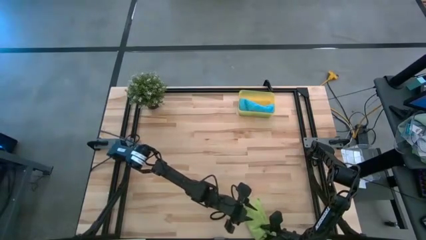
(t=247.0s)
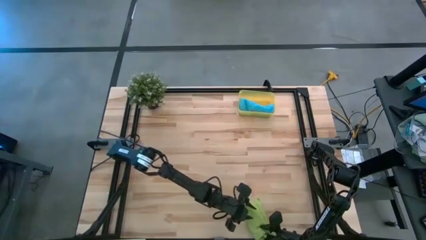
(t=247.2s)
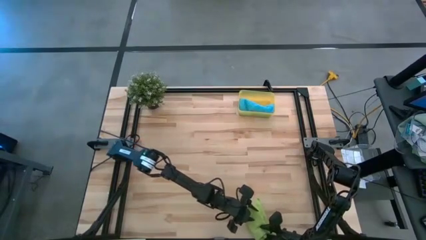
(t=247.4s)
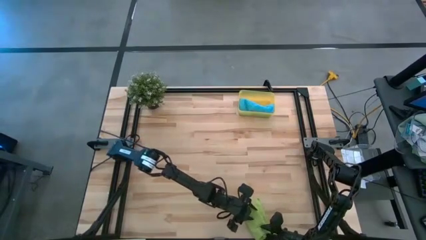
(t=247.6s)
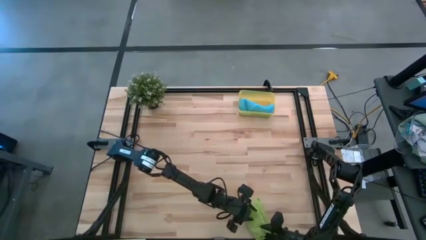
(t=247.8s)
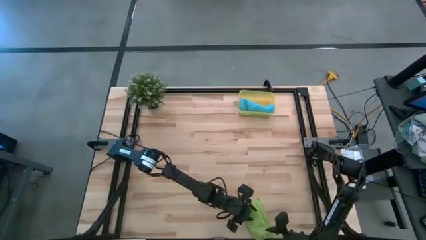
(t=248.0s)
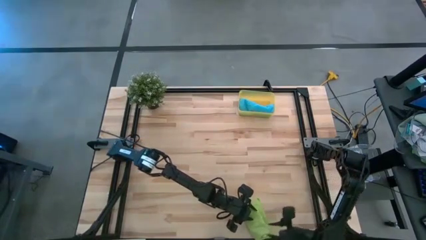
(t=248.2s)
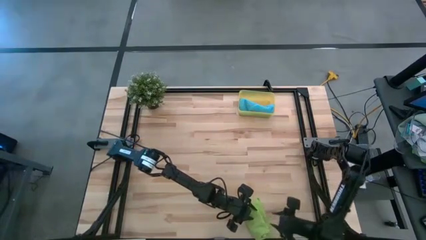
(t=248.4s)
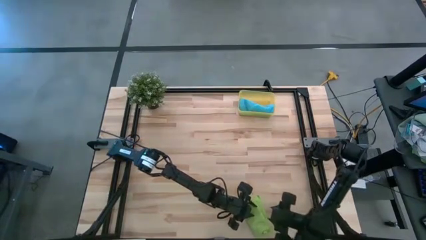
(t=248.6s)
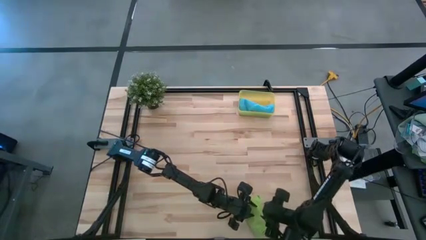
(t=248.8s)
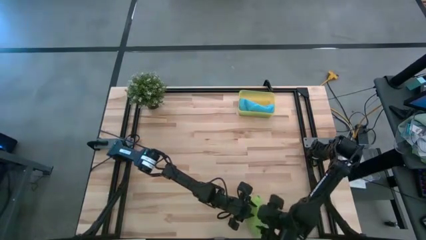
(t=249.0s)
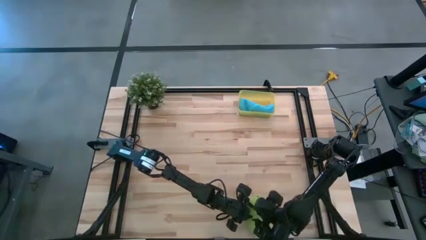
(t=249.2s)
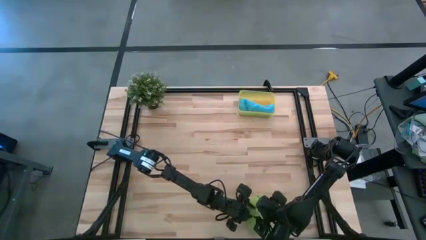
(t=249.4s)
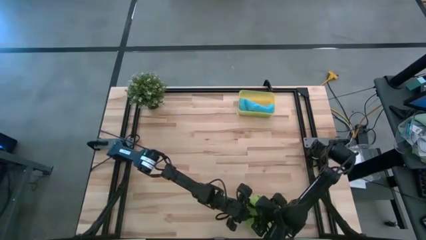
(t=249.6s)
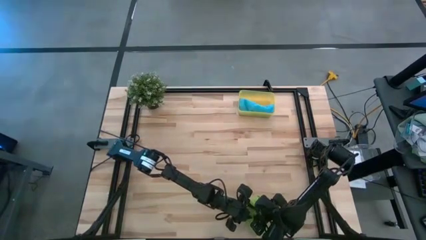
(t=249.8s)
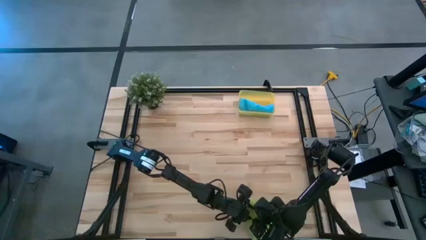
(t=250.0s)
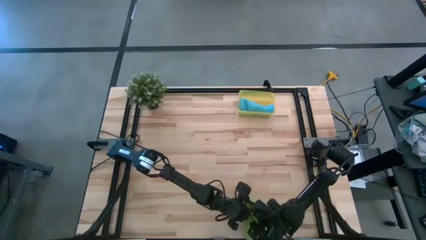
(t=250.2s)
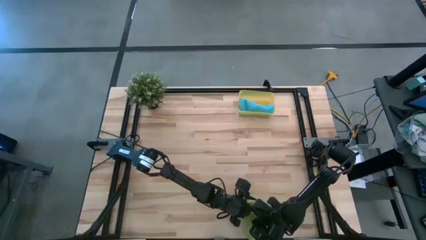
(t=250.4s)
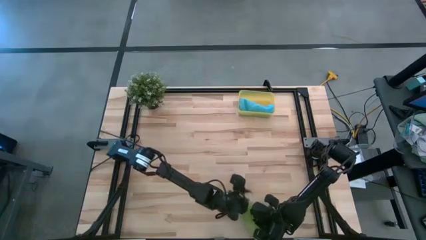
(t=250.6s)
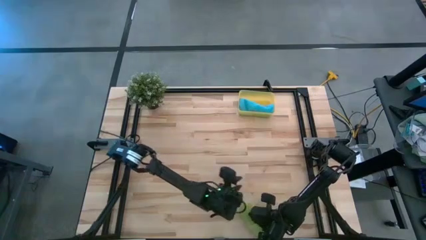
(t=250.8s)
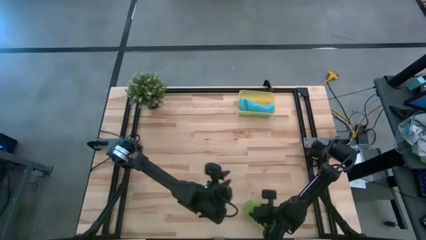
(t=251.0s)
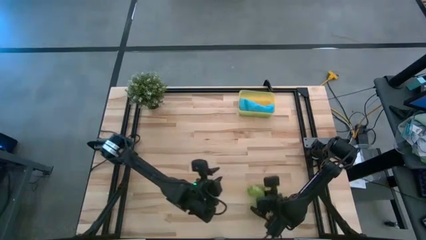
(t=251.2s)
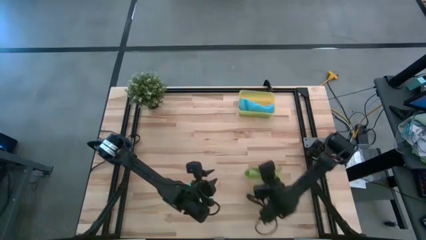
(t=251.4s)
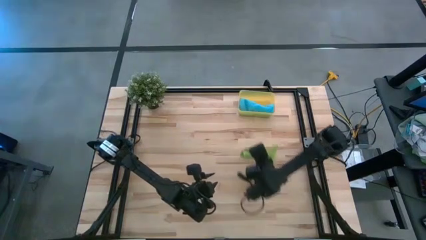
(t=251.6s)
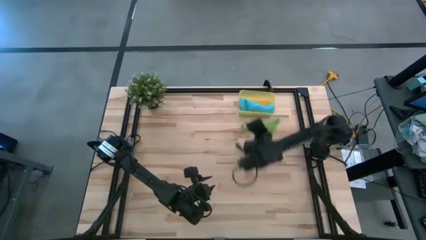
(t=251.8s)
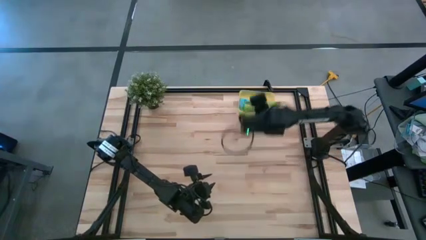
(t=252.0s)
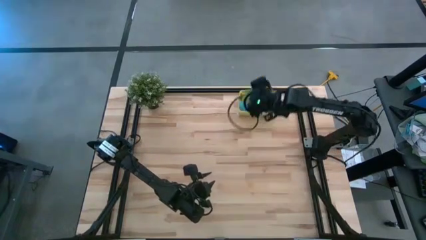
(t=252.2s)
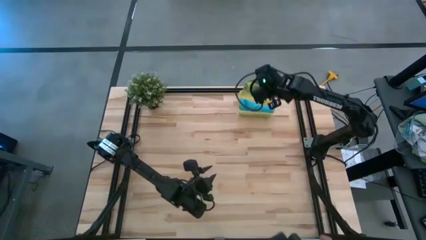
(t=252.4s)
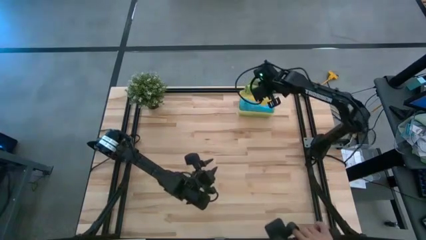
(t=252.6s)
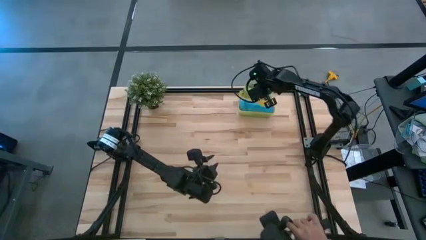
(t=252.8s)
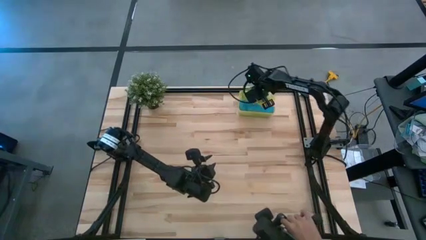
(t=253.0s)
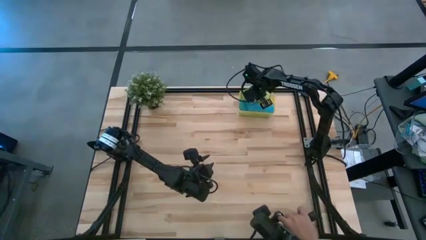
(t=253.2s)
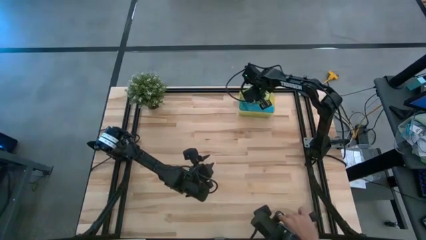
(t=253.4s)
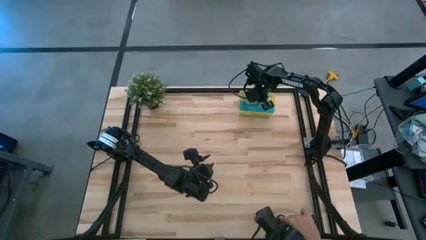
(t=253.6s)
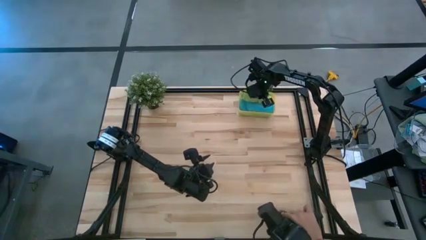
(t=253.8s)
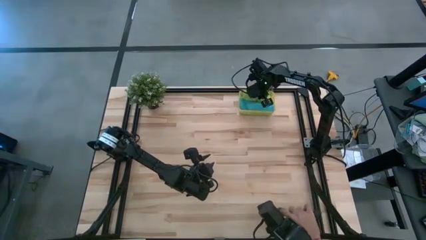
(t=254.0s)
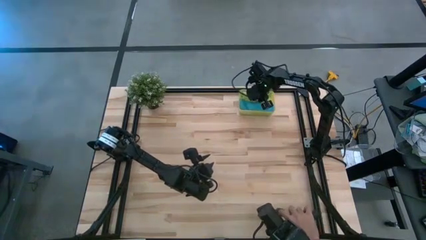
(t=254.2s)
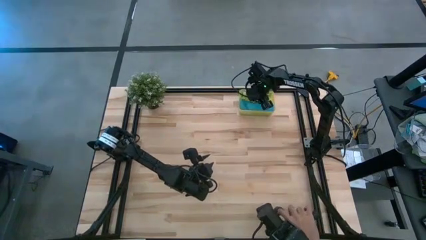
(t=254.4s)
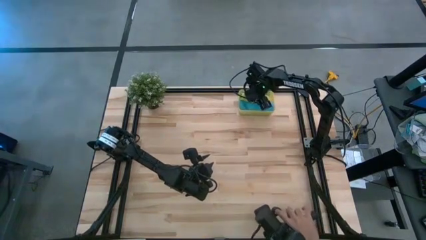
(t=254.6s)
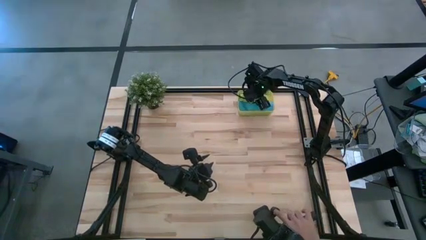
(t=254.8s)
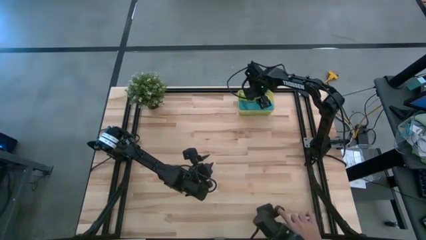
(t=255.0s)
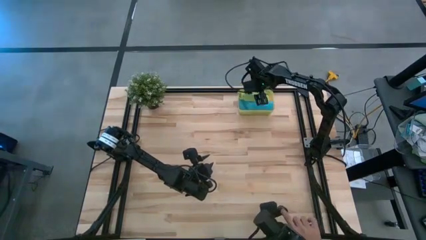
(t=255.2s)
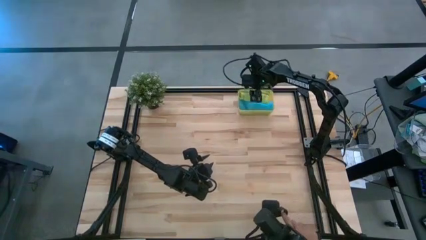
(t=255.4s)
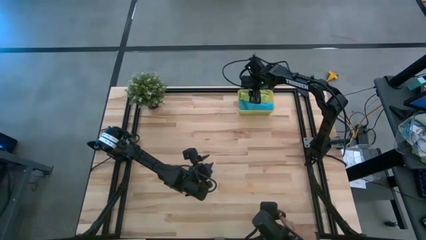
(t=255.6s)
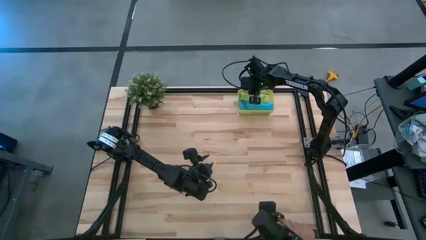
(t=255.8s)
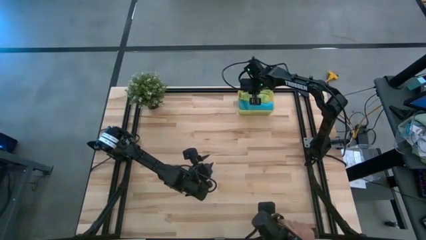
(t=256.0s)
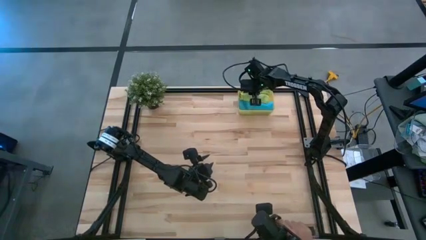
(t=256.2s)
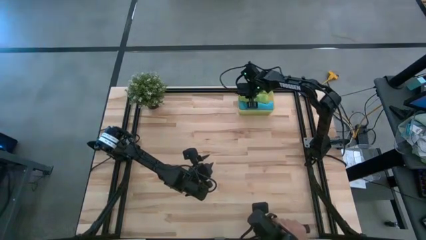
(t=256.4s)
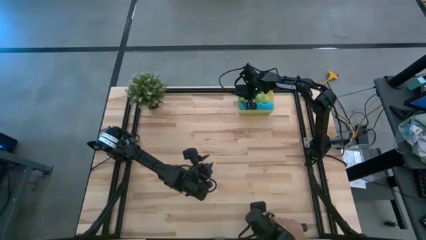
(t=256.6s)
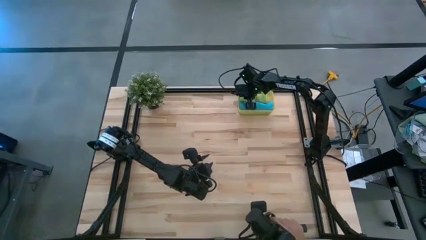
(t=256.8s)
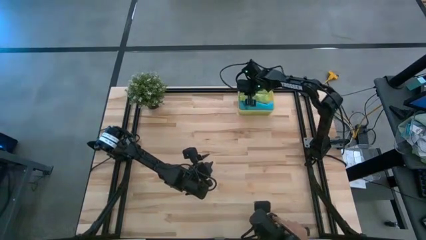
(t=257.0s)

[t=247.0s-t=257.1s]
Task: Roll microfiber towels into tight, uniform cylinder then place into a basket
Put the green microfiber towel into the yellow bin

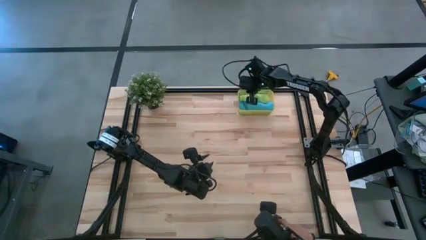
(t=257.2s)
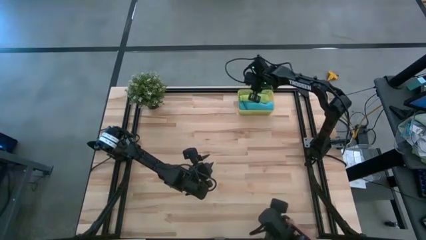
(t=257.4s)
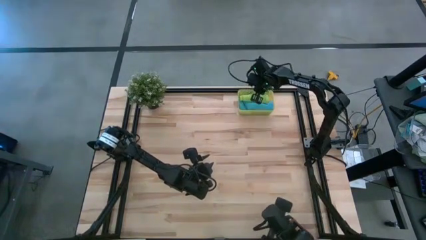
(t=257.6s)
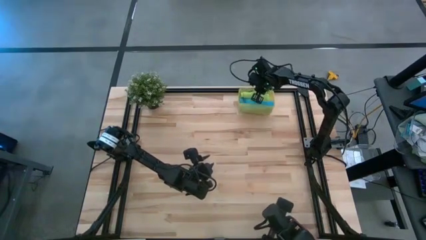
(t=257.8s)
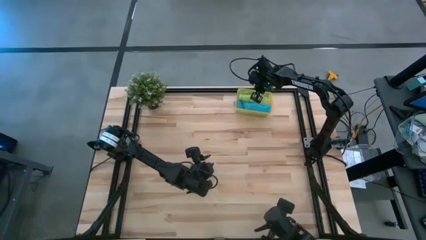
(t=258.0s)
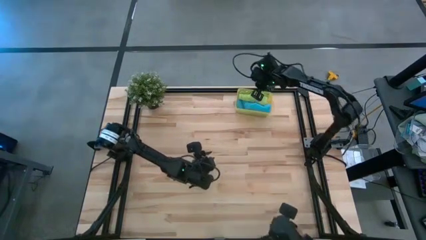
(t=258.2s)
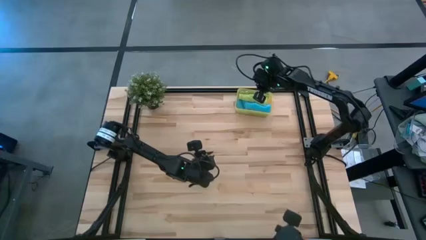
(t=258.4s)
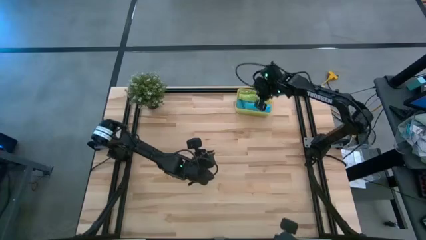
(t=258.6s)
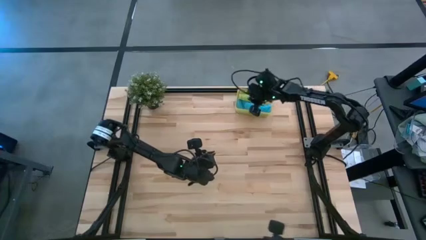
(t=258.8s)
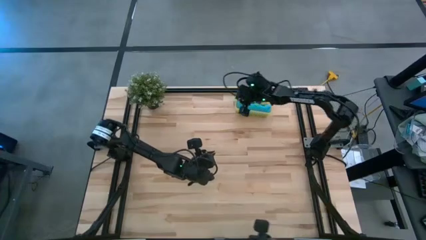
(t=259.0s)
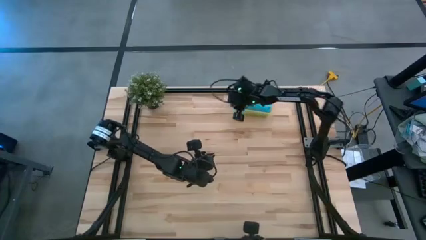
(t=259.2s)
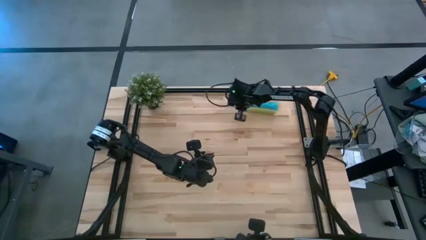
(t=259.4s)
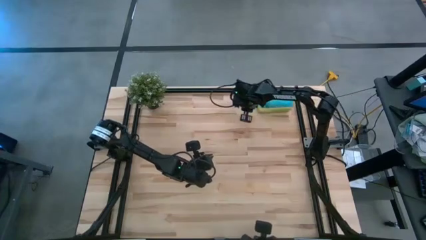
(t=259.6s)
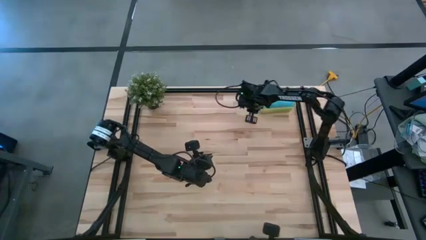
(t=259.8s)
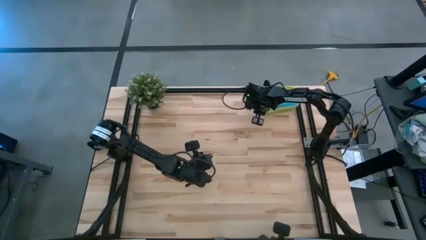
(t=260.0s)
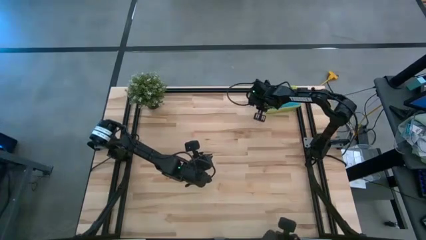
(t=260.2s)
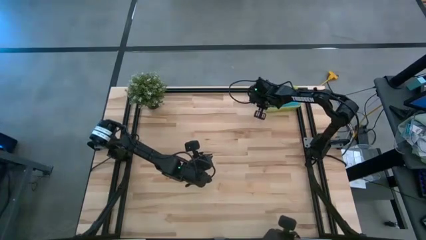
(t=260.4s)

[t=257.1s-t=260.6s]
Adjust the yellow bin
